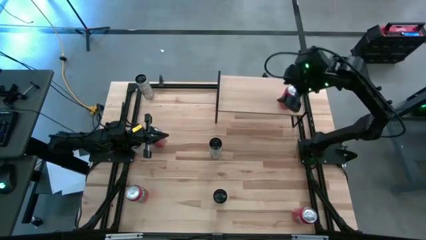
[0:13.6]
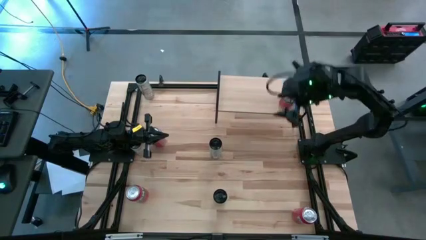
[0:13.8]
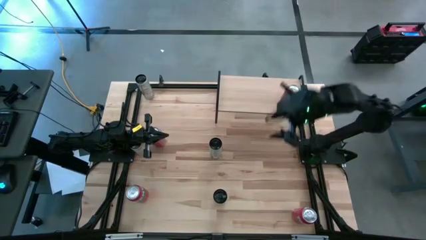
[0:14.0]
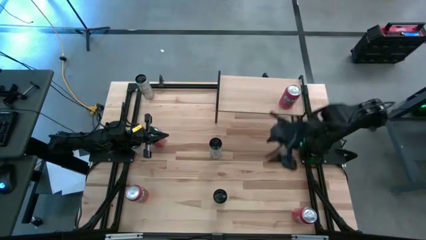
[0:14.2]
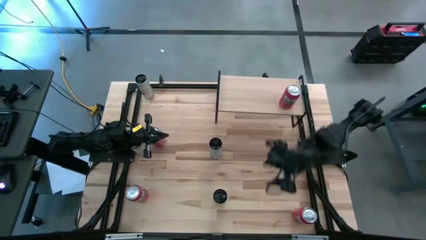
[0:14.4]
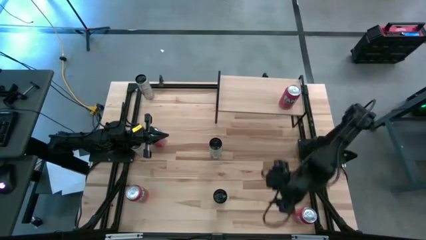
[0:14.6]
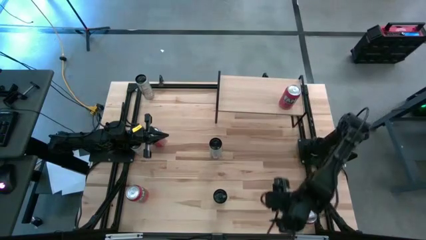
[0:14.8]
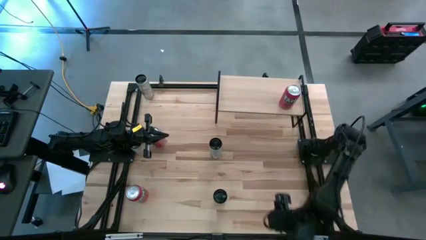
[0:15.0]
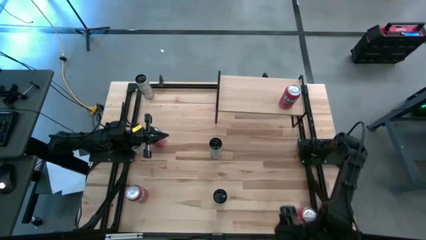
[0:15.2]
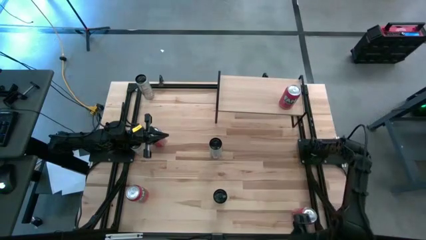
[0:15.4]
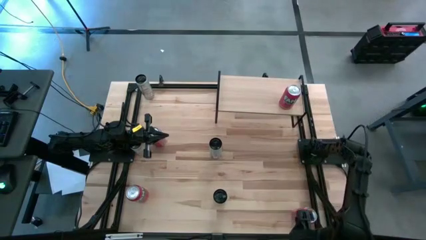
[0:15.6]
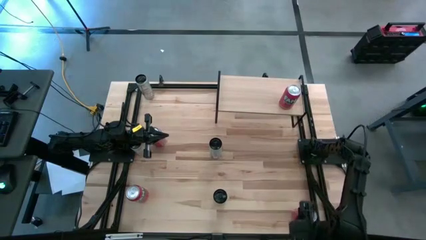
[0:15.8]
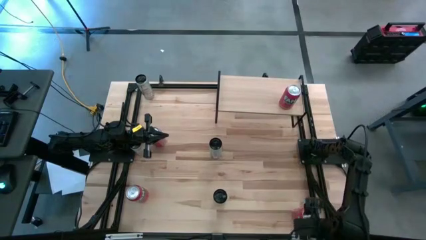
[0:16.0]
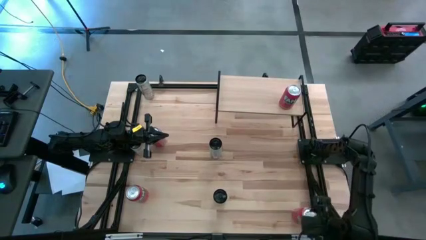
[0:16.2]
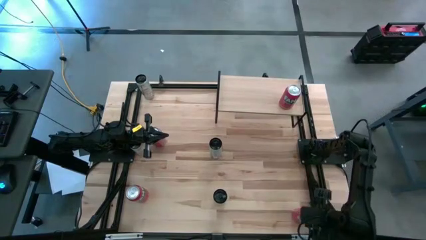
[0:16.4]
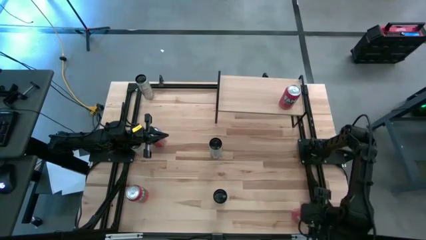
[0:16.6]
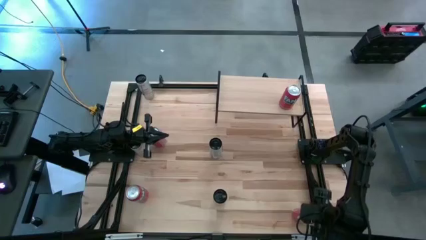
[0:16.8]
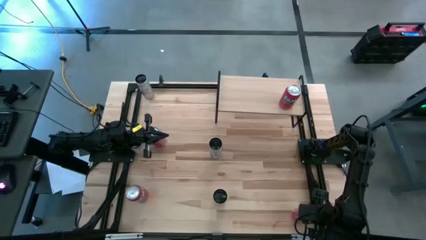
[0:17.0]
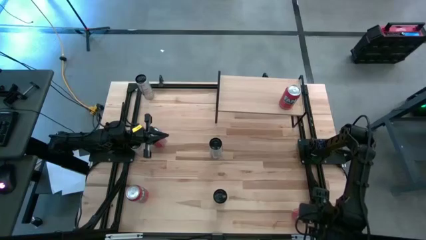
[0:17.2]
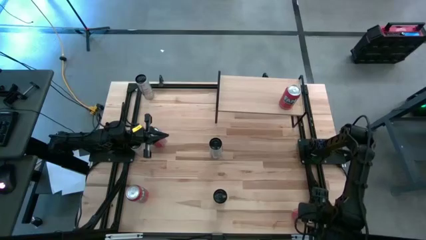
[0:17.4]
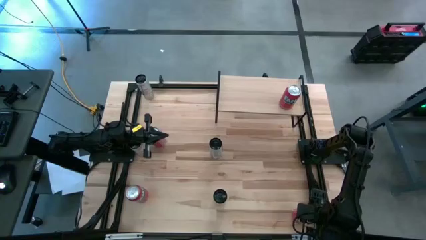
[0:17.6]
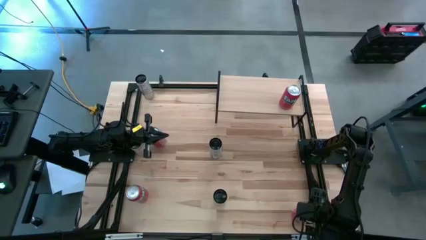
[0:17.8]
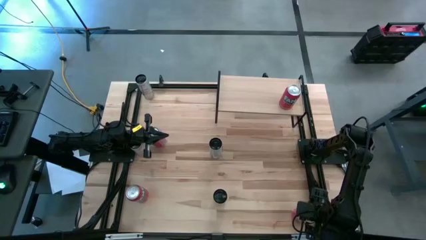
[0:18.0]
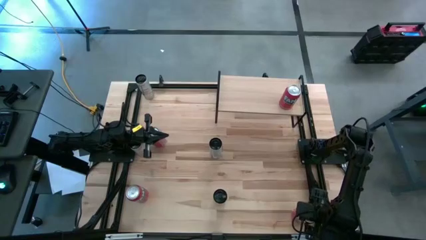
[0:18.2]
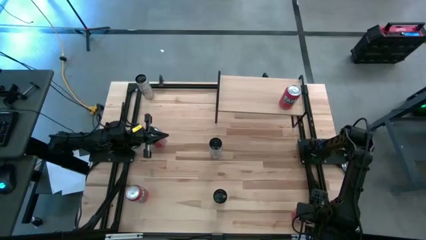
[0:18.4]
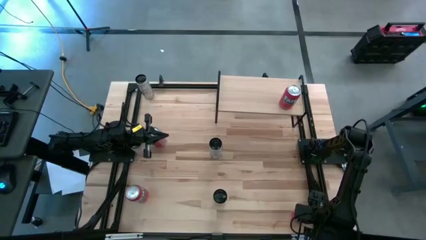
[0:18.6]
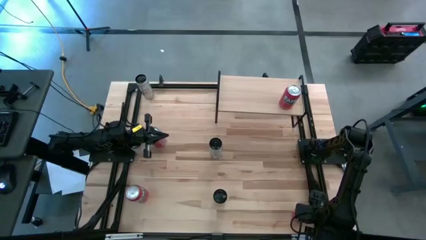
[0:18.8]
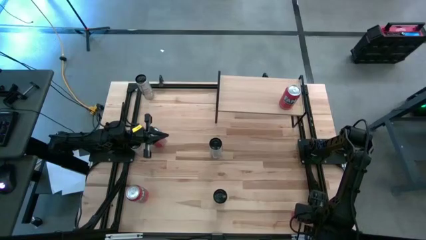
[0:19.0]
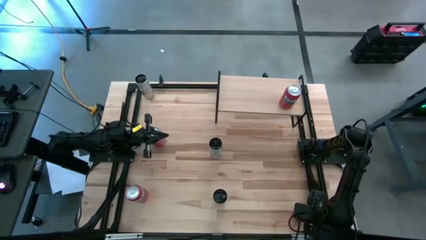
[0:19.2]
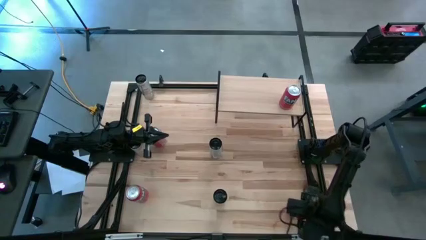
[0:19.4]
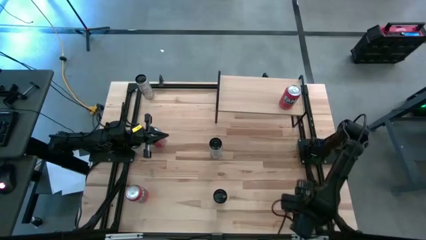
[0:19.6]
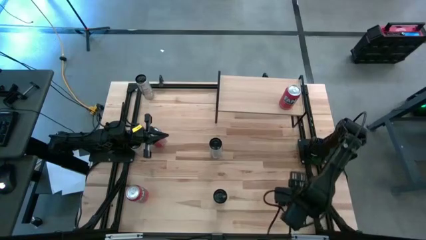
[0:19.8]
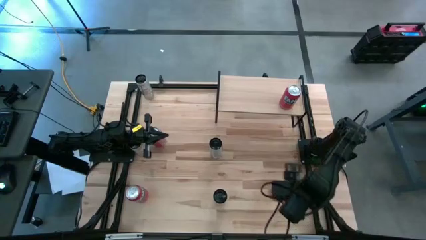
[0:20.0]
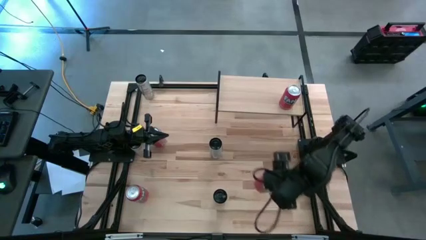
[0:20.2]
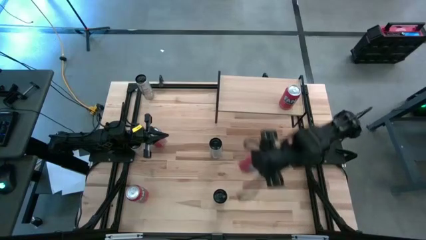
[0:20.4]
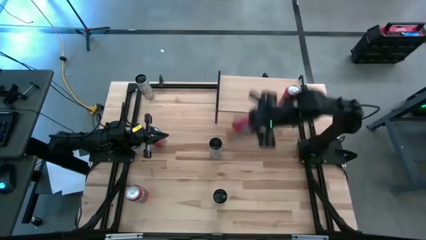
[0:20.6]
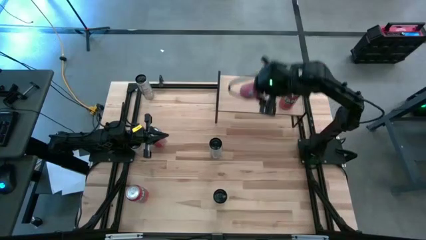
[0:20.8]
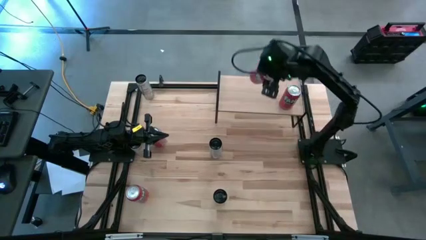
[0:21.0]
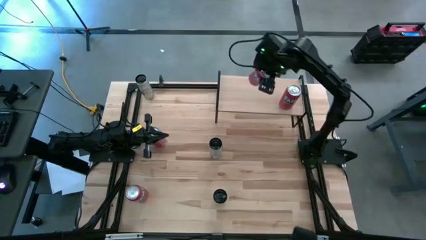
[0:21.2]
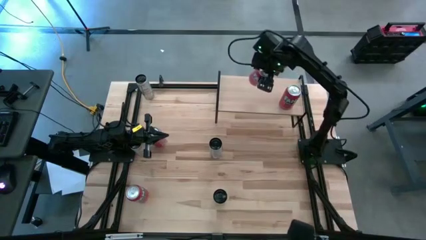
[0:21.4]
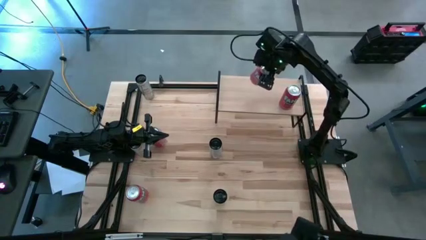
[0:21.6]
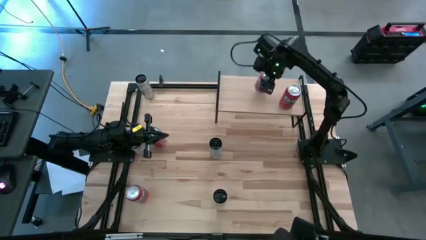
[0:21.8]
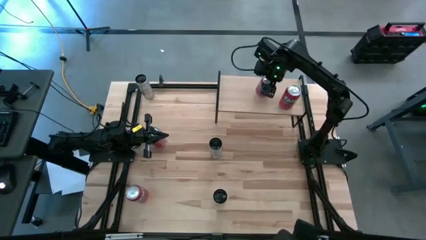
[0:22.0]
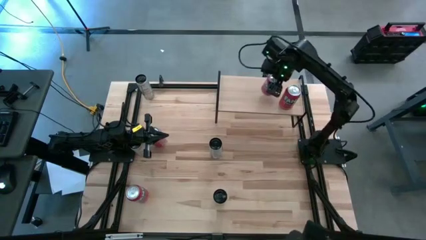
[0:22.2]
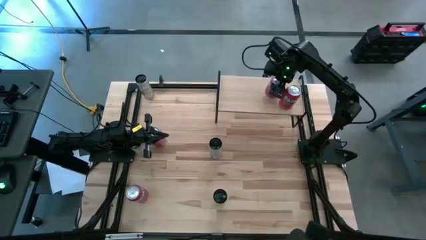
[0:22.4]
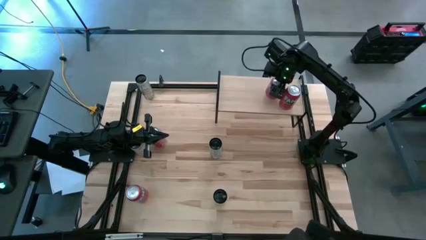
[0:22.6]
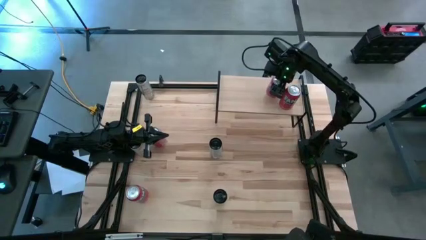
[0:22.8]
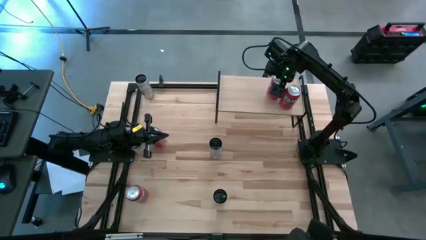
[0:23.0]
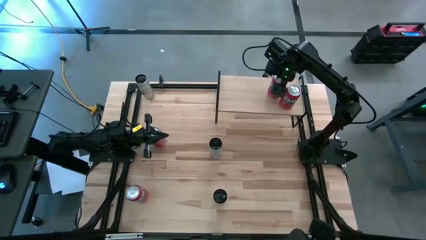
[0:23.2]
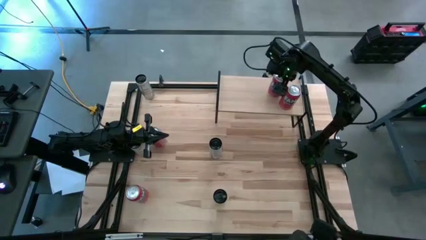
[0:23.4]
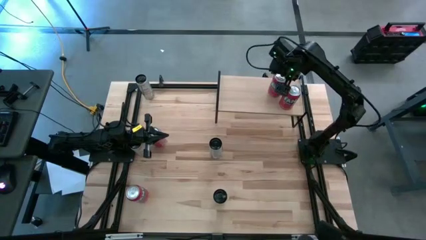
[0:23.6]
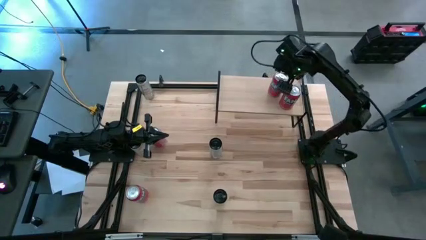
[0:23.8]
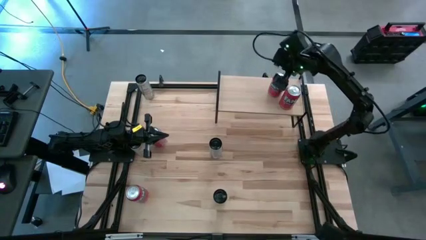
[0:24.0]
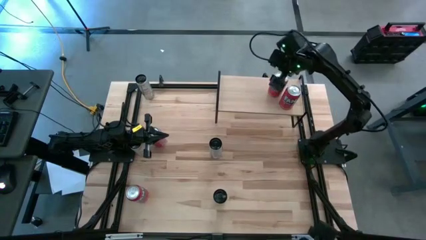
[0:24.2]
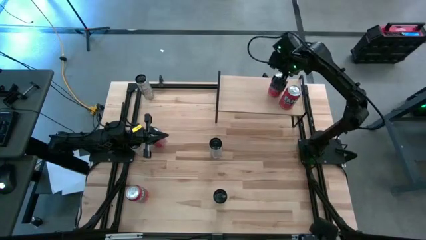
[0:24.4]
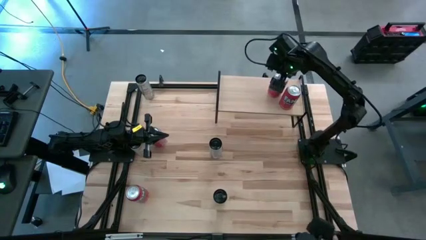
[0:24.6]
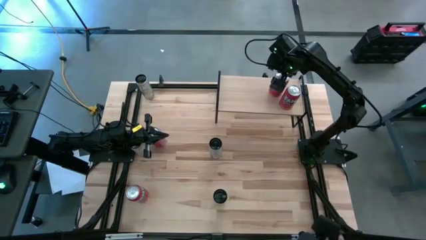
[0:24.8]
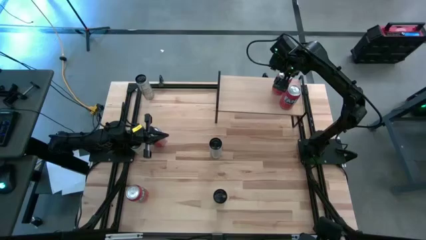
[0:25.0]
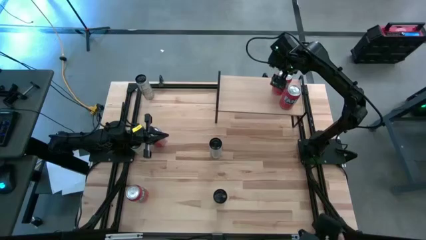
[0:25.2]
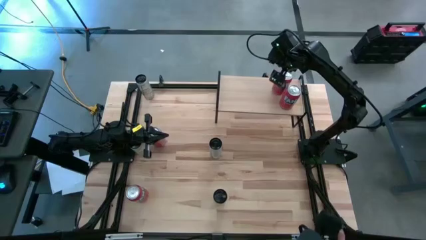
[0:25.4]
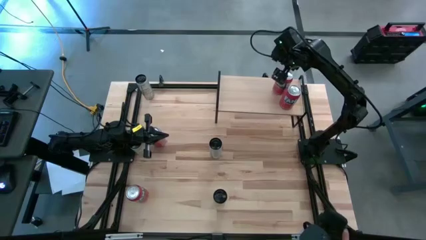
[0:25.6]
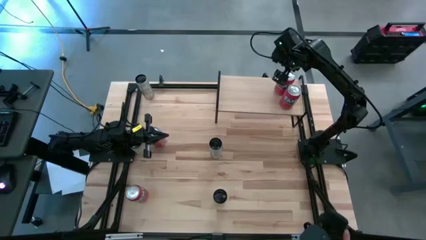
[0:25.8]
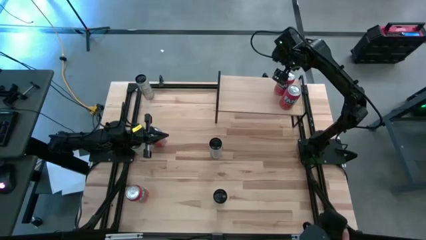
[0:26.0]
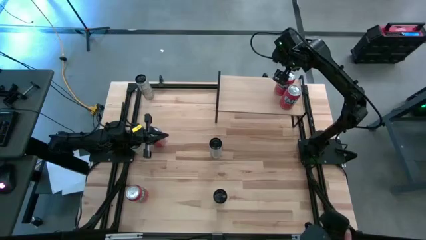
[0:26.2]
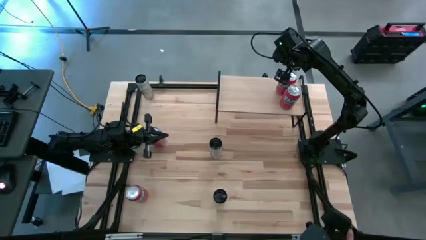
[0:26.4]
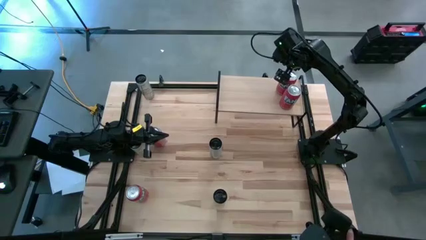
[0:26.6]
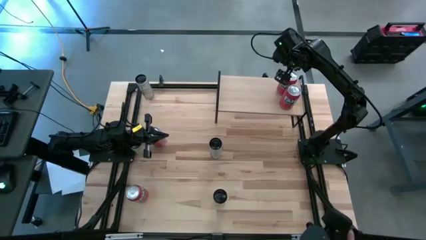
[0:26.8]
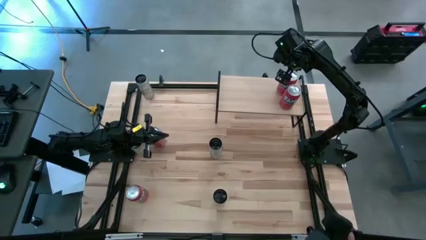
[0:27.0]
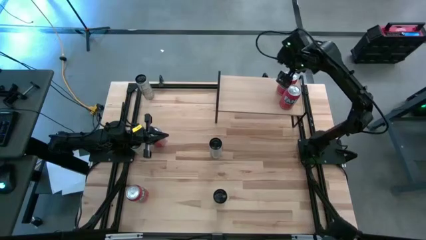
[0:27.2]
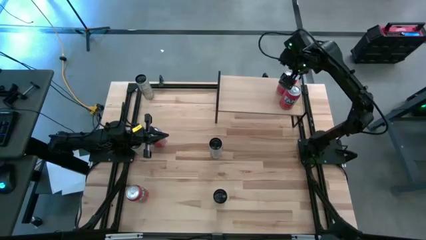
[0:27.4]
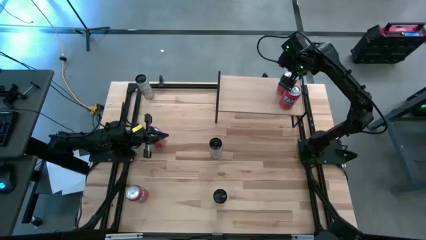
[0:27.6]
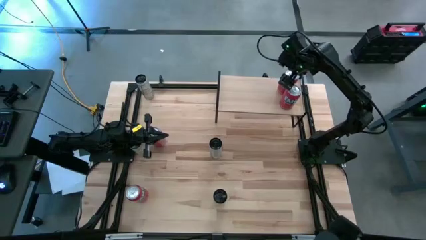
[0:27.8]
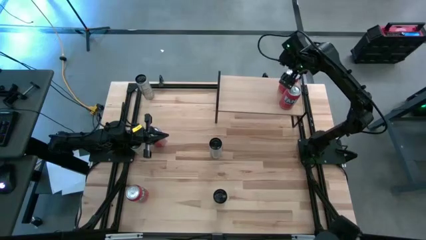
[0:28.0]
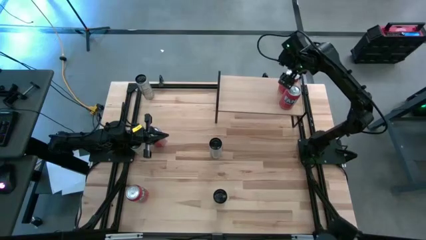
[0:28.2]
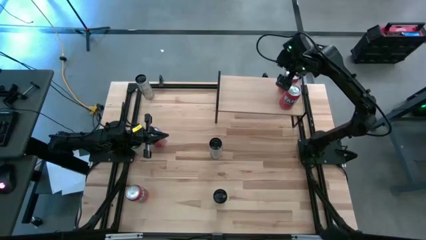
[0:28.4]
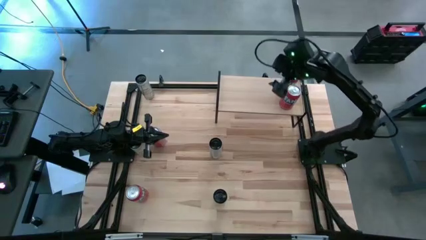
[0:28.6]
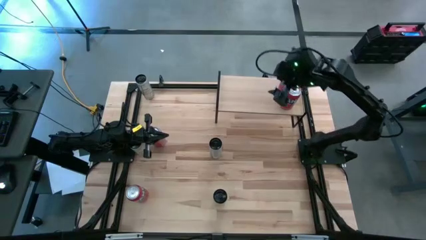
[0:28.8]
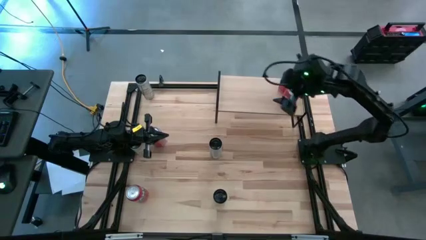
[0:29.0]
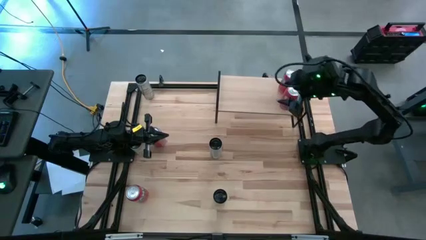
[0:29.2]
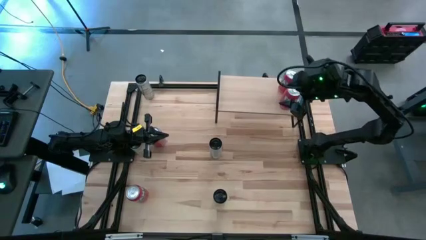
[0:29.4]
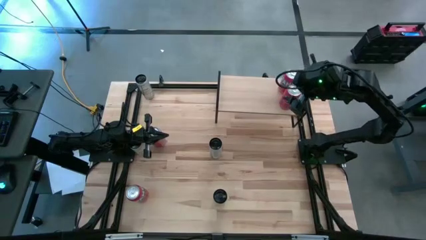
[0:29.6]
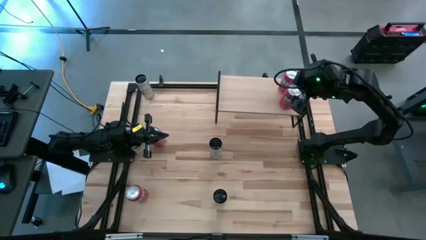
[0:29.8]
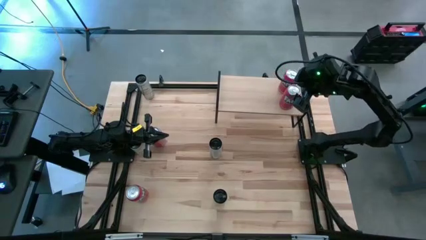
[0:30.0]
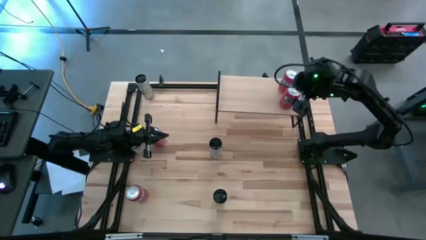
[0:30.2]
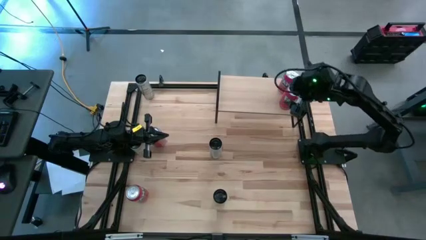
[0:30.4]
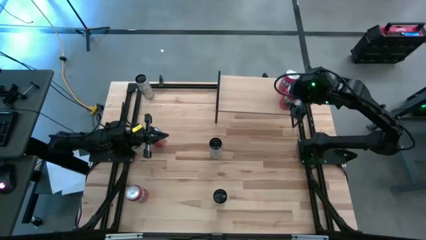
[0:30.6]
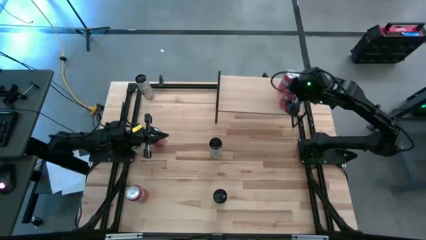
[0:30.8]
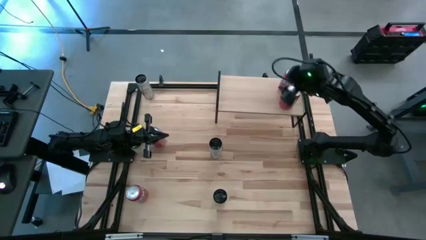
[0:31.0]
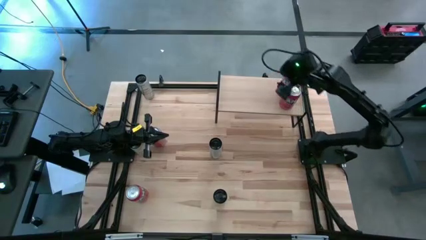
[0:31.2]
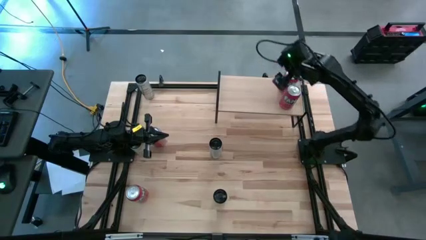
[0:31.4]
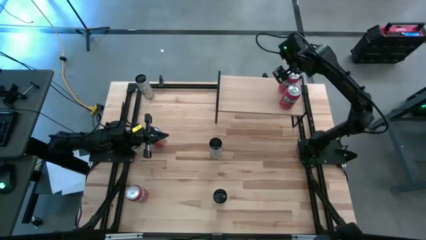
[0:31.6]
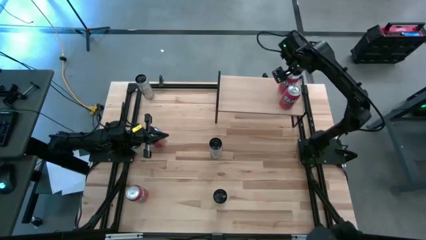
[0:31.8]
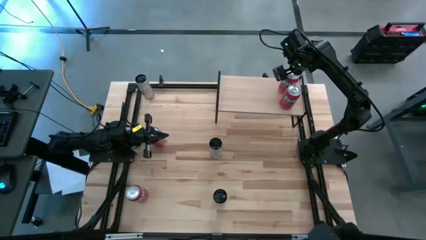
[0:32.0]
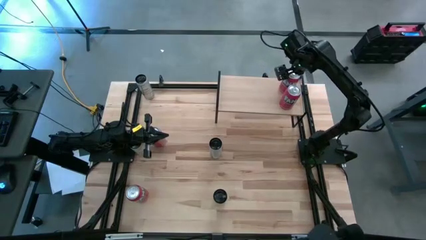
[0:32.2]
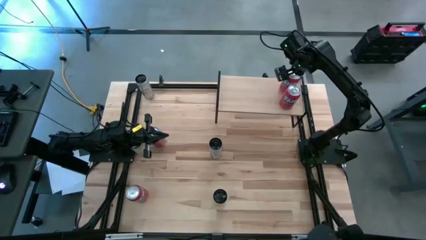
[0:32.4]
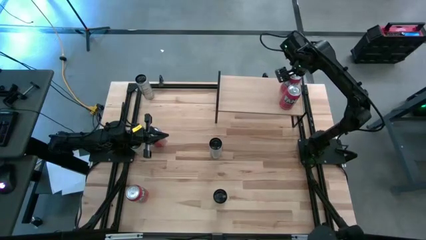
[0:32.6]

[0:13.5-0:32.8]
Task: Place canned beverage on shelf
Put the orange soda can on the shelf aligned with the other orange soda can
